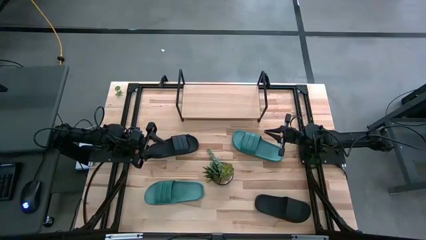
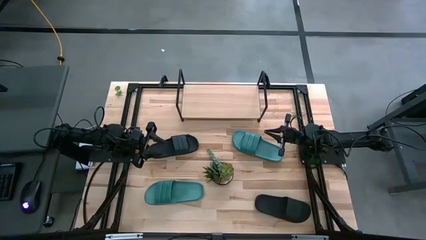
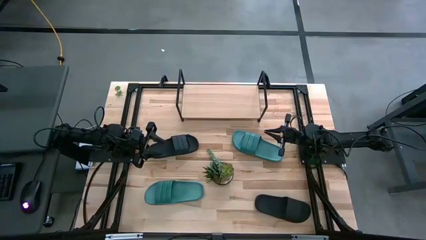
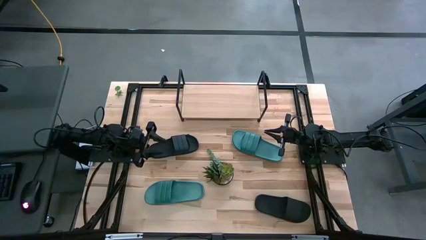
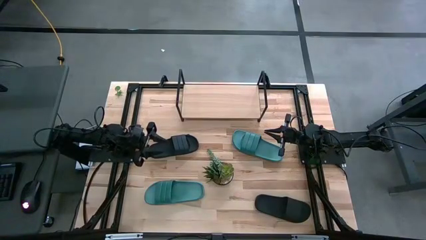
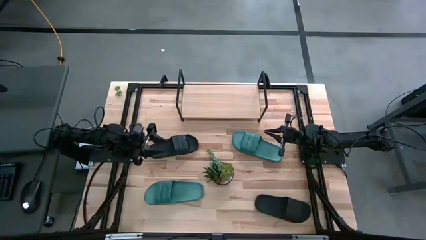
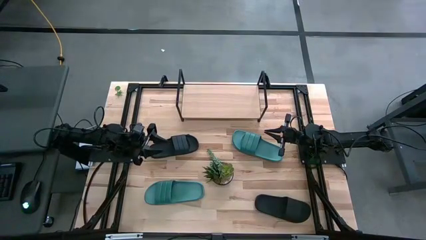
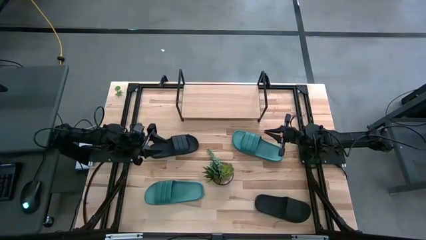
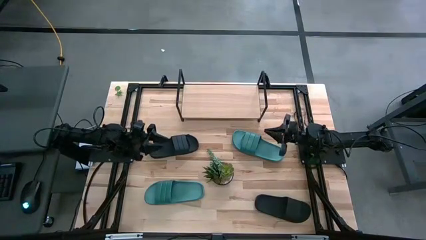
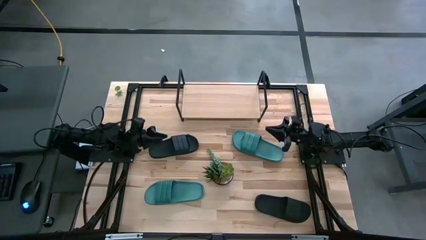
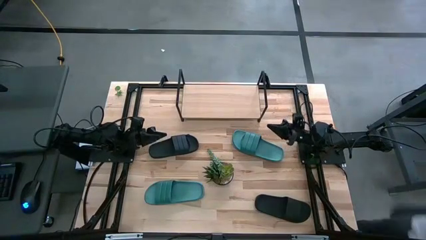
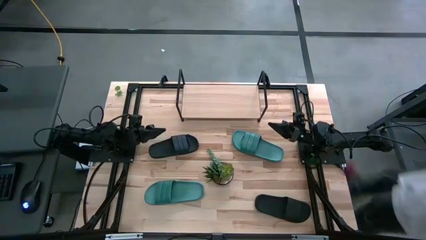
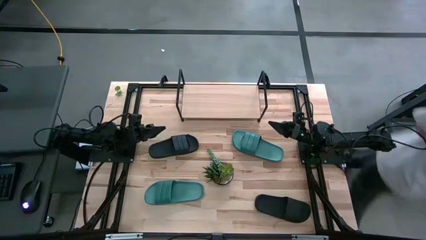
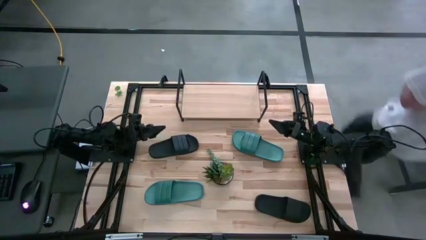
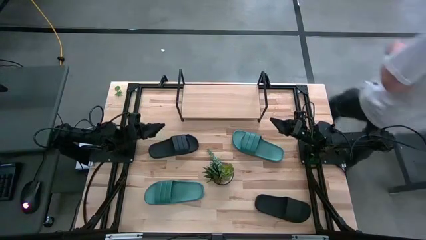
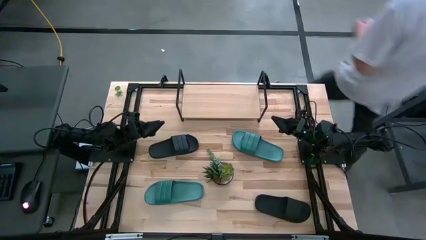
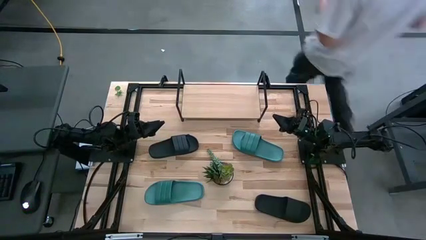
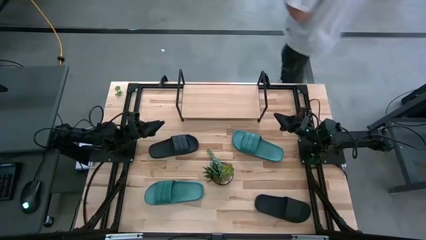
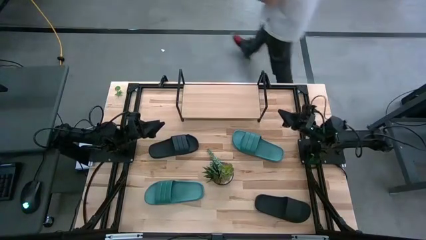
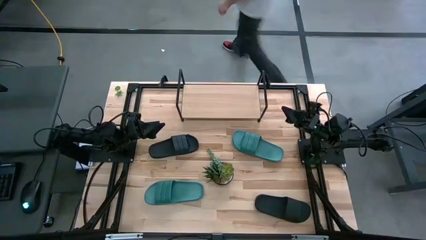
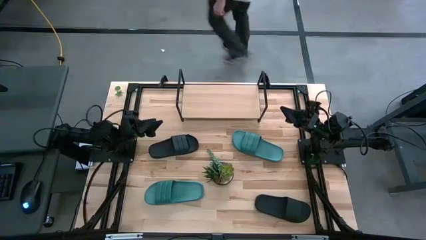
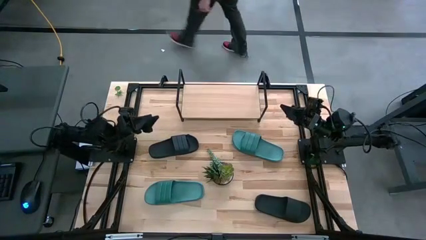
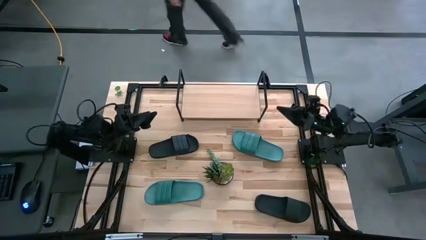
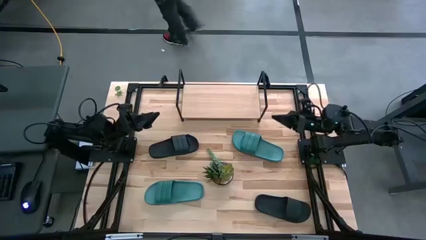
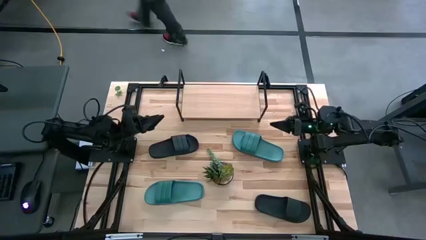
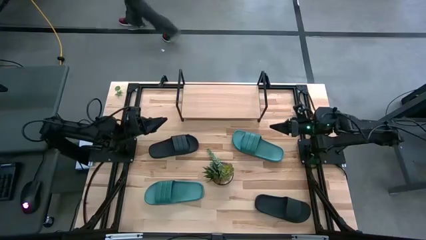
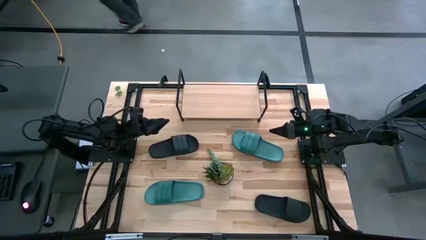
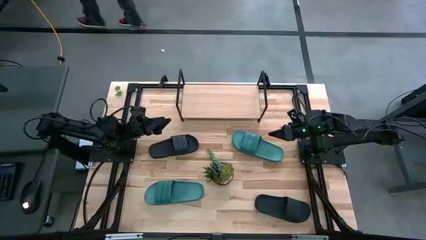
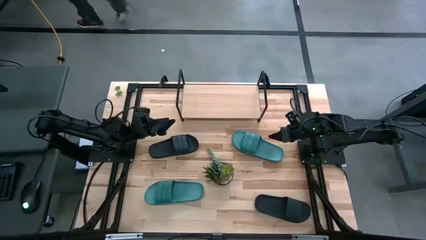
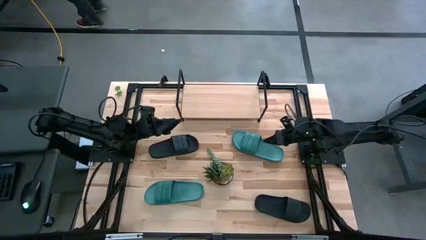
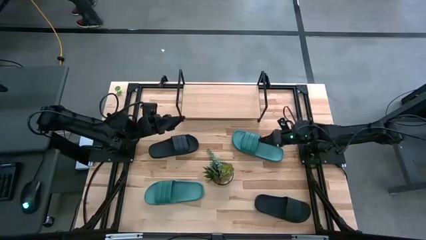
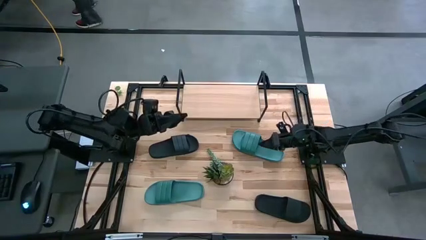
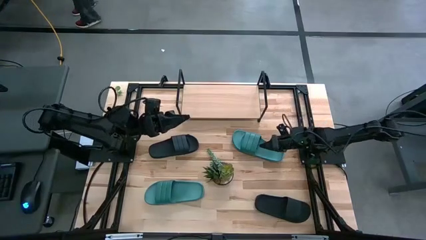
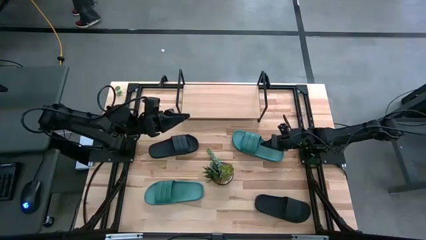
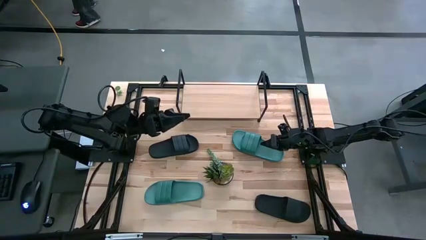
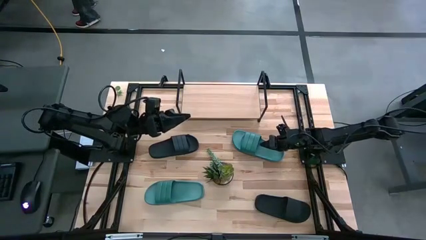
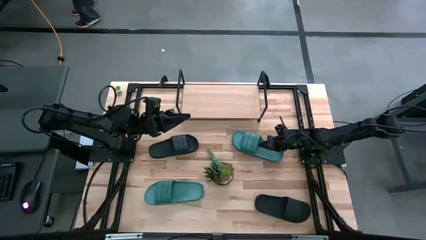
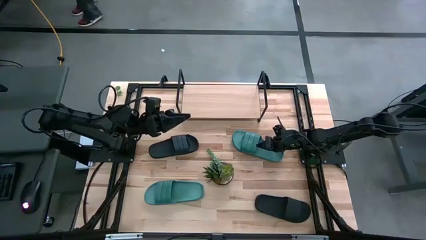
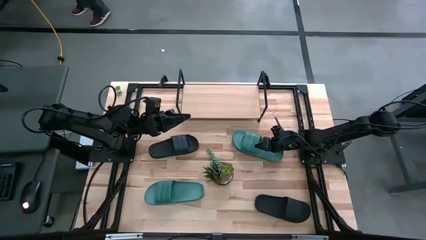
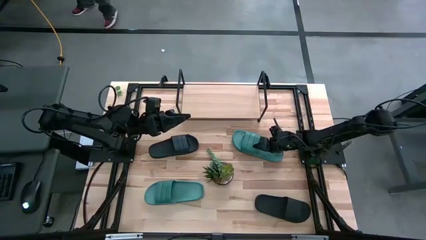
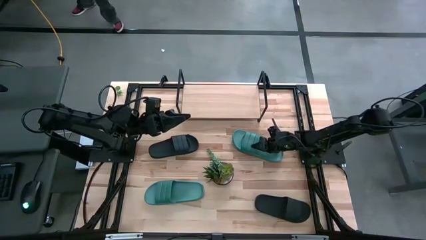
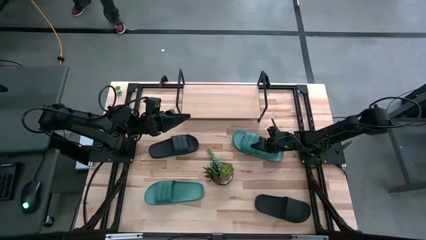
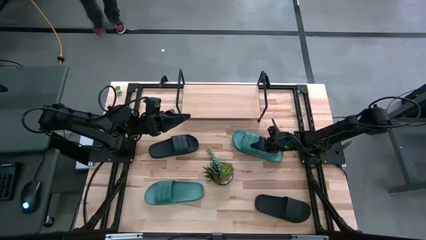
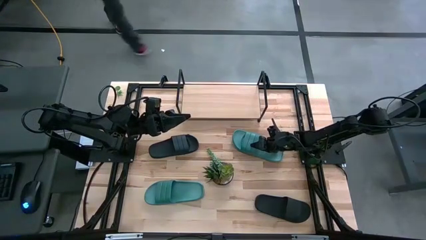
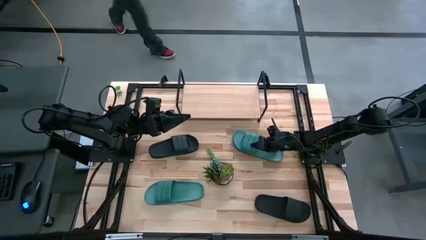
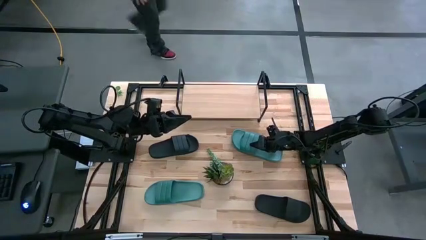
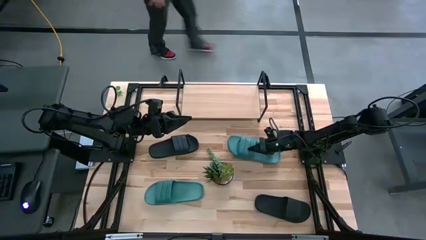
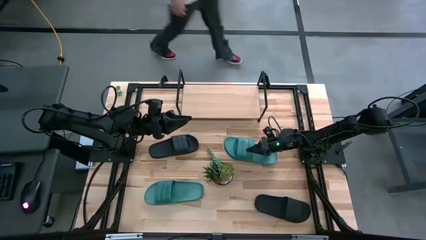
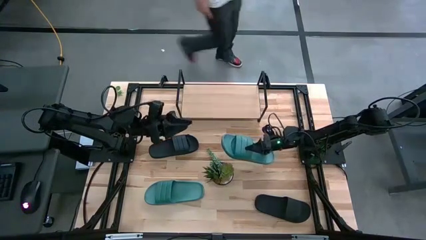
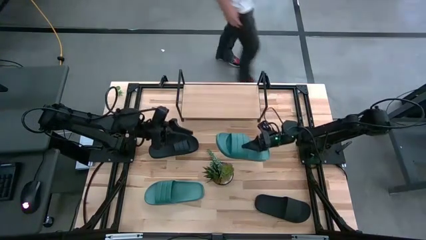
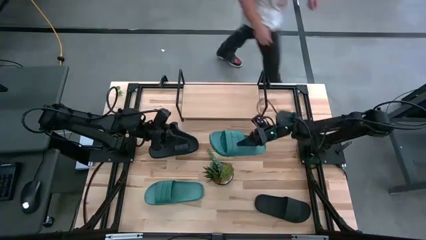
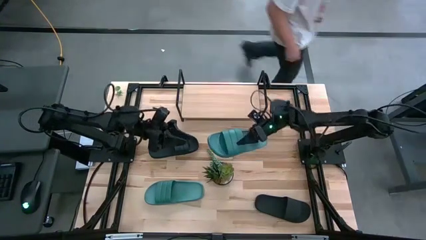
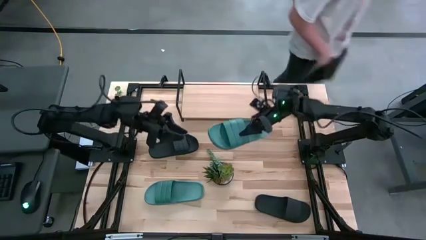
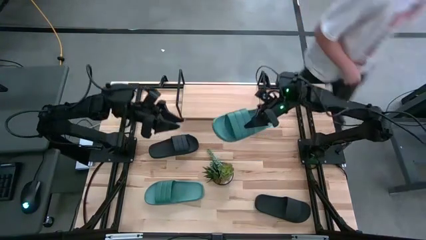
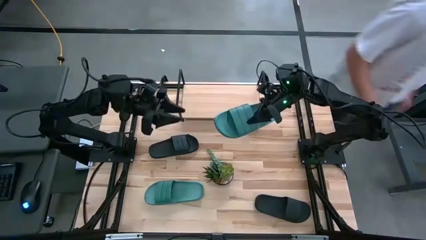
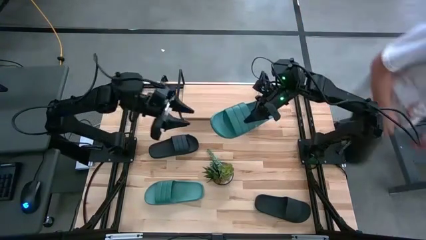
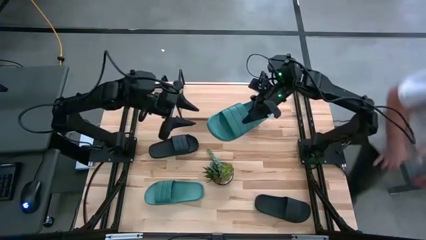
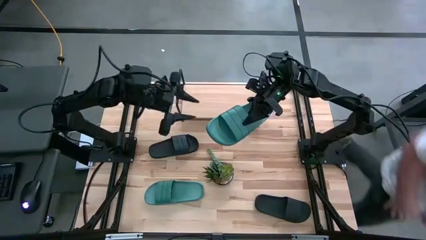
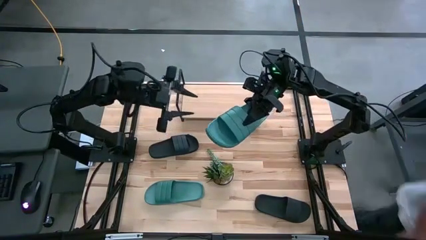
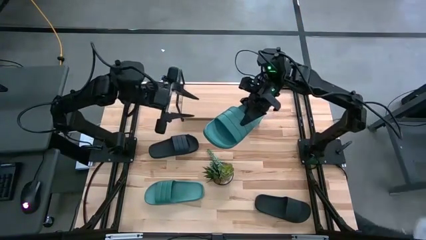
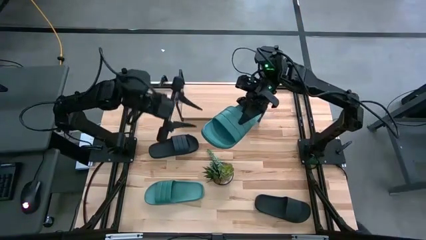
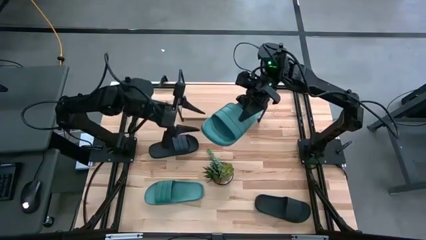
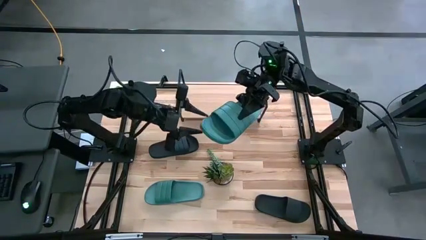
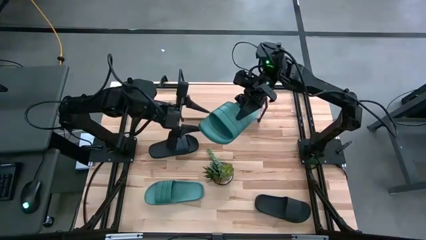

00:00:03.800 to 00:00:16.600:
Task: Pick and place slides into the shelf
Put the right blue slipper on the shelf
